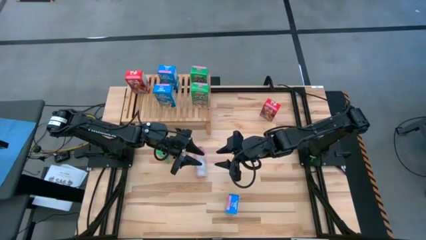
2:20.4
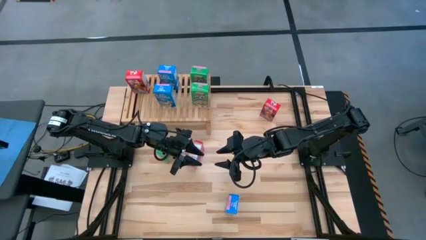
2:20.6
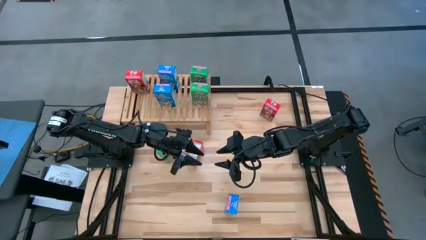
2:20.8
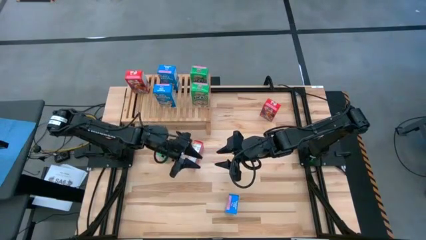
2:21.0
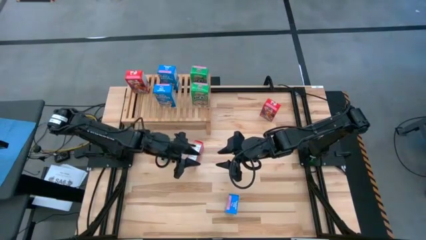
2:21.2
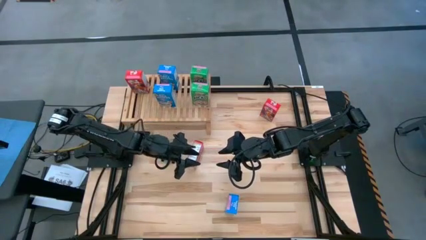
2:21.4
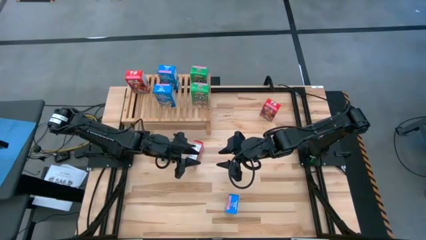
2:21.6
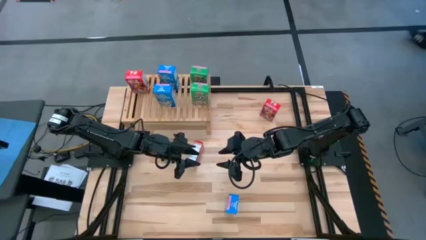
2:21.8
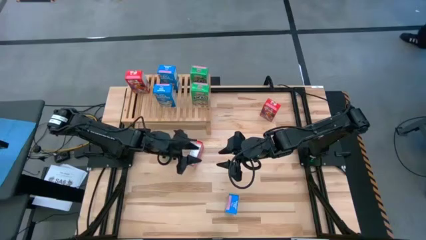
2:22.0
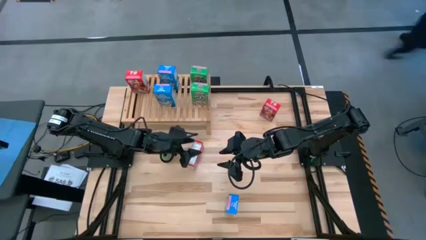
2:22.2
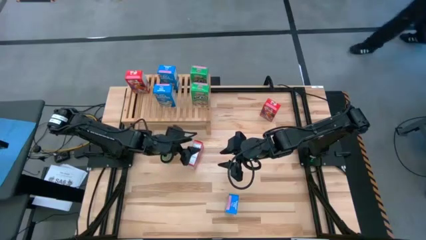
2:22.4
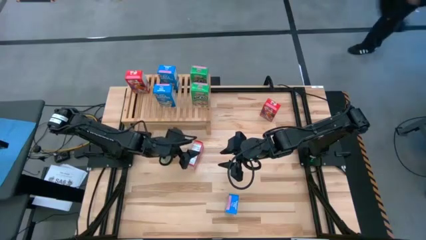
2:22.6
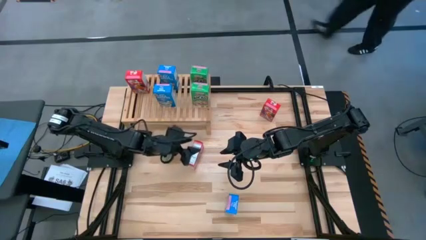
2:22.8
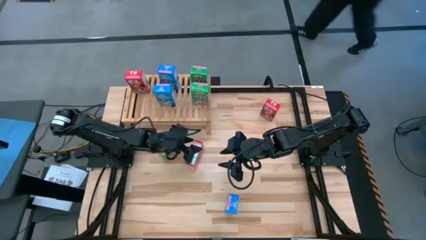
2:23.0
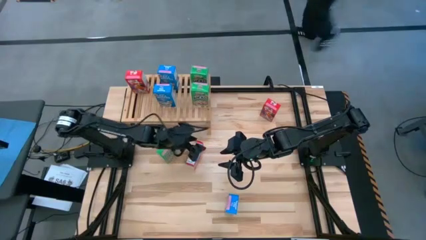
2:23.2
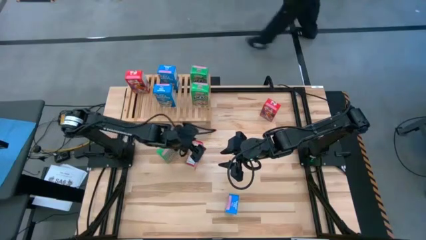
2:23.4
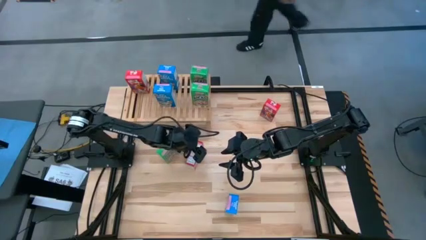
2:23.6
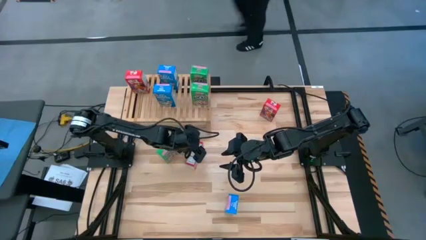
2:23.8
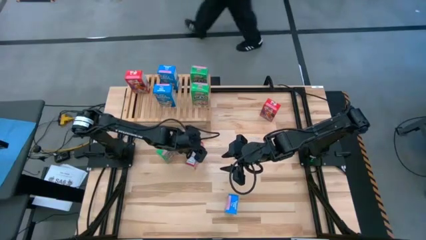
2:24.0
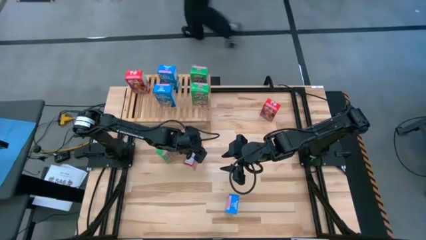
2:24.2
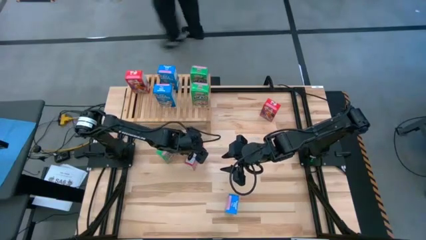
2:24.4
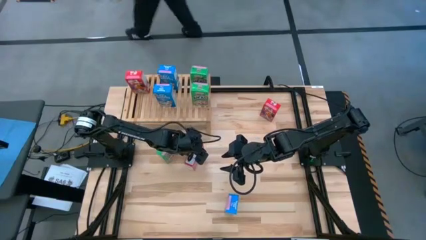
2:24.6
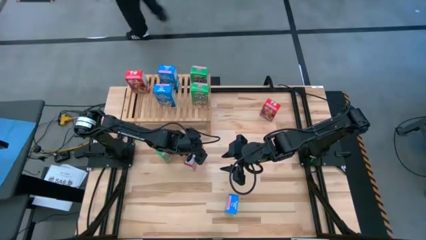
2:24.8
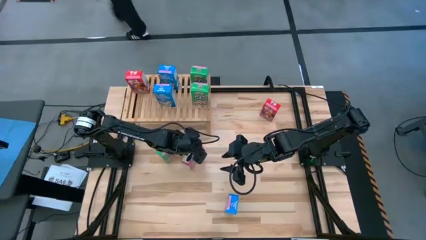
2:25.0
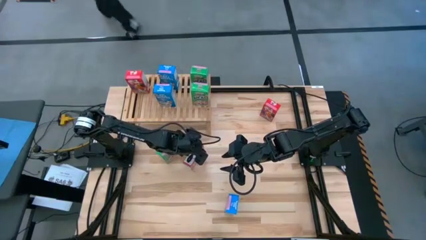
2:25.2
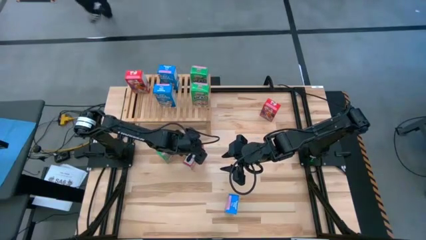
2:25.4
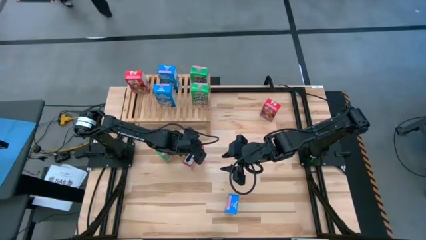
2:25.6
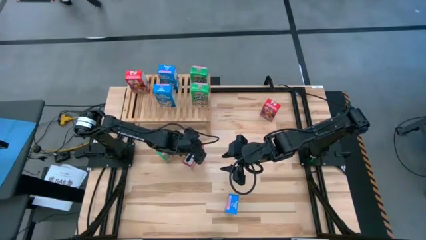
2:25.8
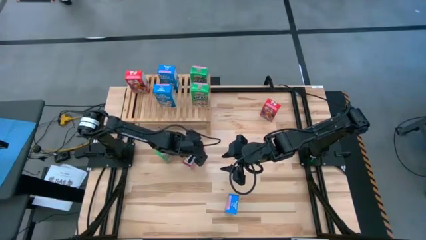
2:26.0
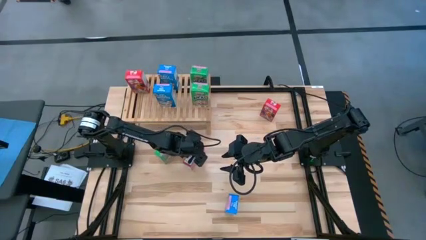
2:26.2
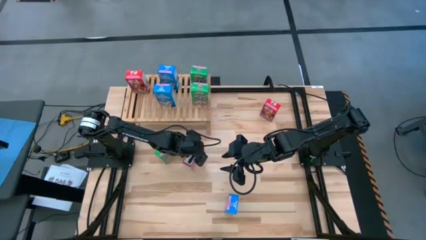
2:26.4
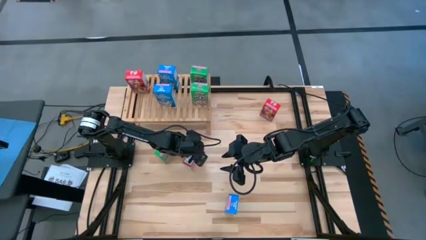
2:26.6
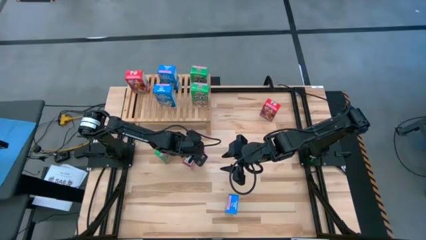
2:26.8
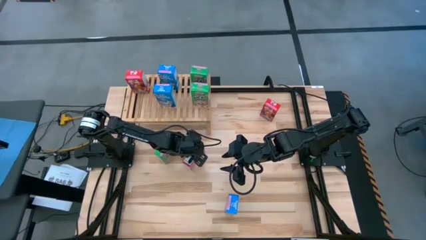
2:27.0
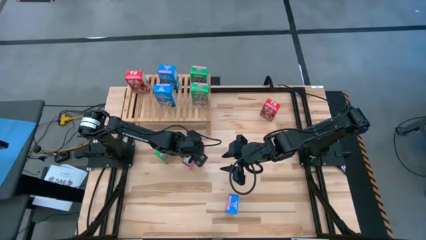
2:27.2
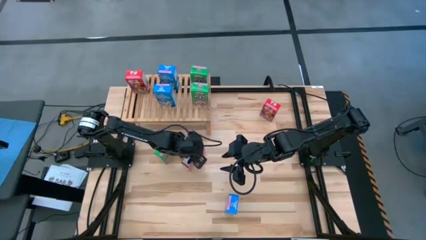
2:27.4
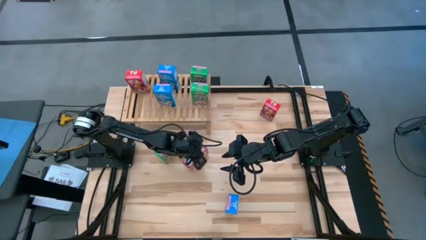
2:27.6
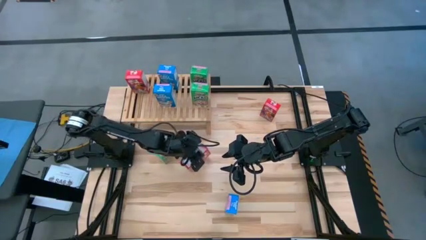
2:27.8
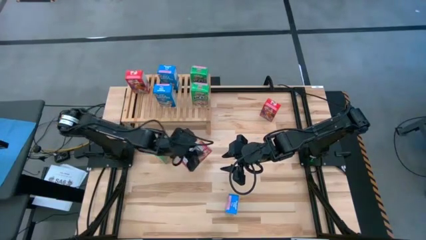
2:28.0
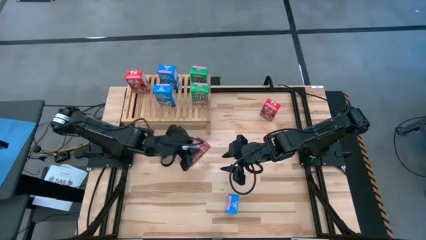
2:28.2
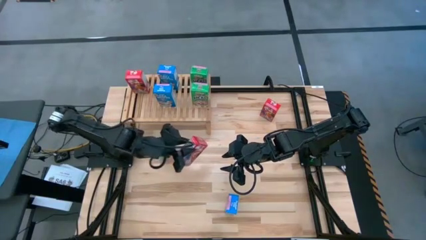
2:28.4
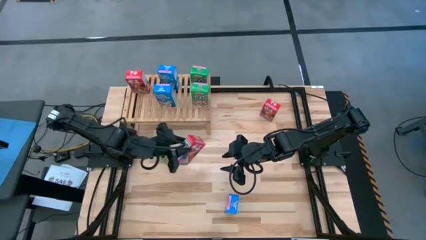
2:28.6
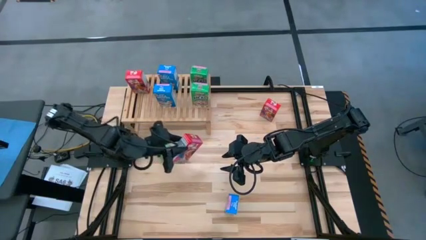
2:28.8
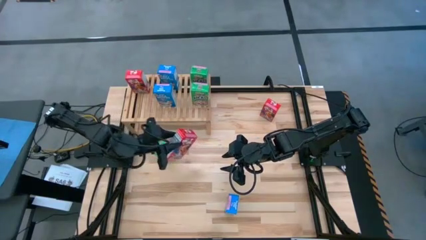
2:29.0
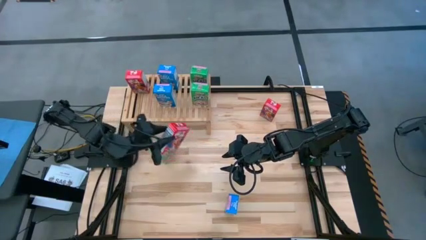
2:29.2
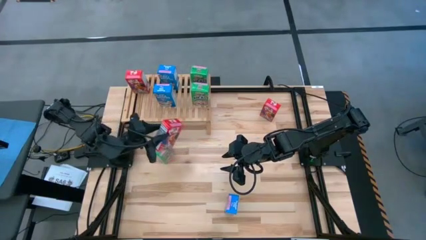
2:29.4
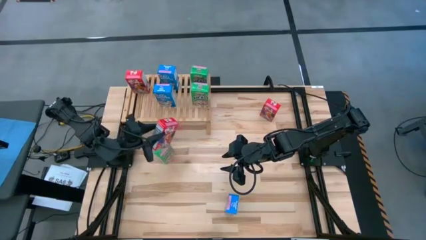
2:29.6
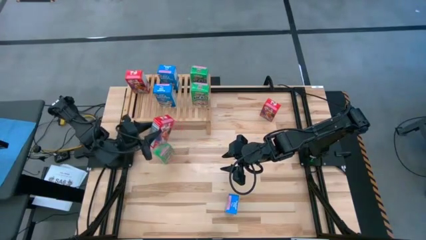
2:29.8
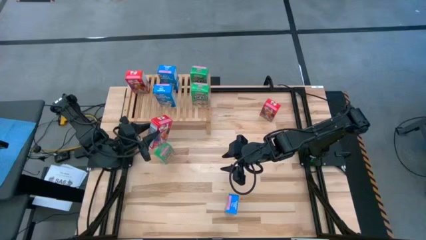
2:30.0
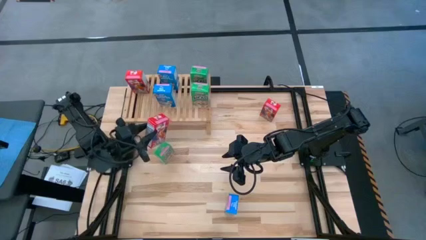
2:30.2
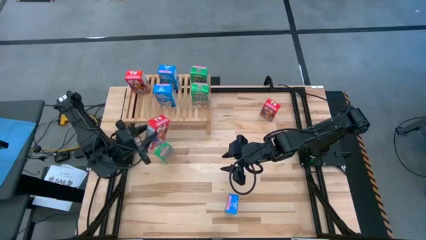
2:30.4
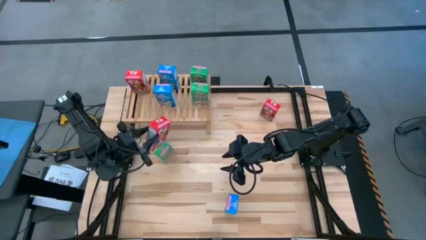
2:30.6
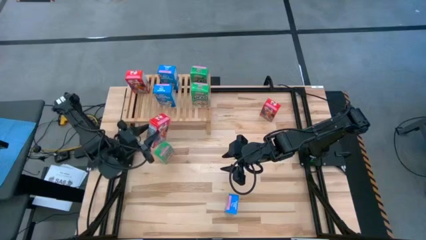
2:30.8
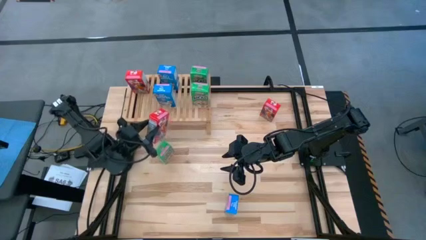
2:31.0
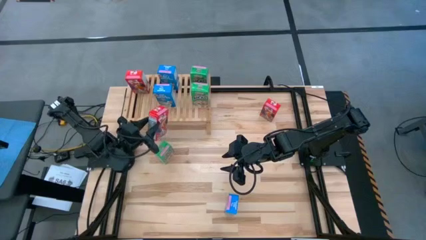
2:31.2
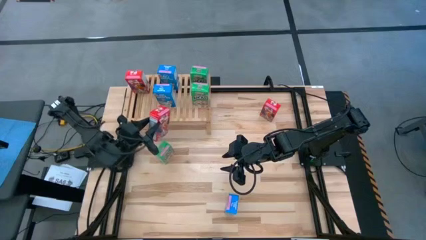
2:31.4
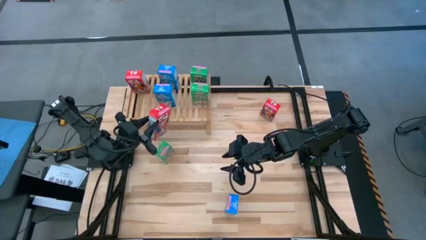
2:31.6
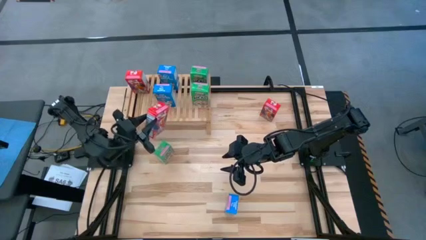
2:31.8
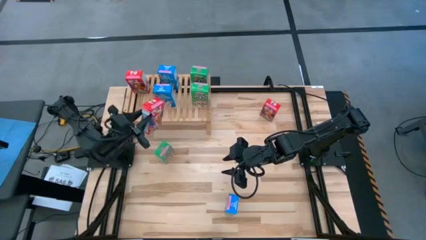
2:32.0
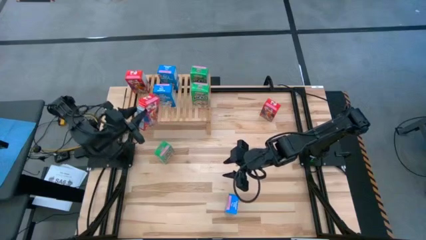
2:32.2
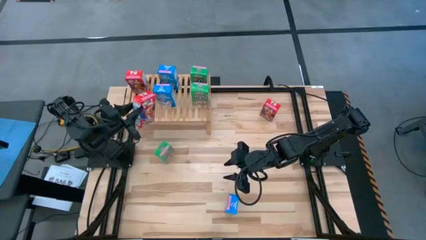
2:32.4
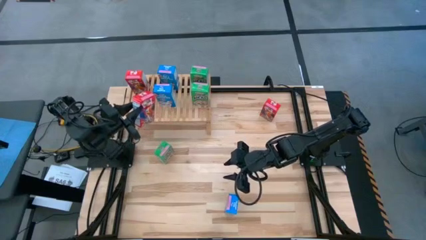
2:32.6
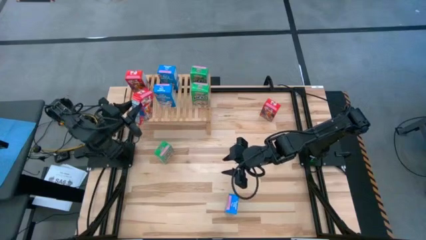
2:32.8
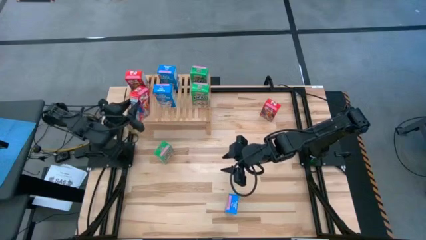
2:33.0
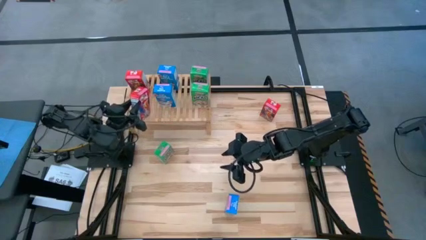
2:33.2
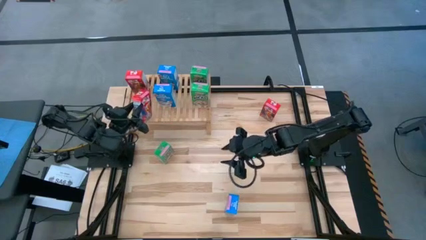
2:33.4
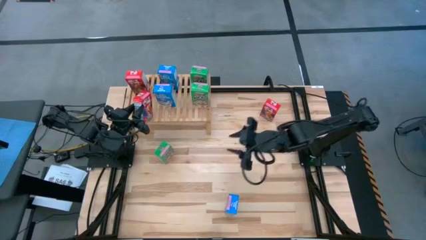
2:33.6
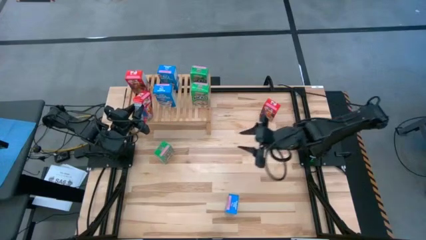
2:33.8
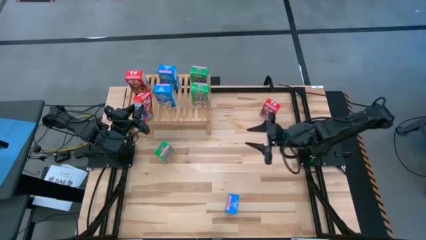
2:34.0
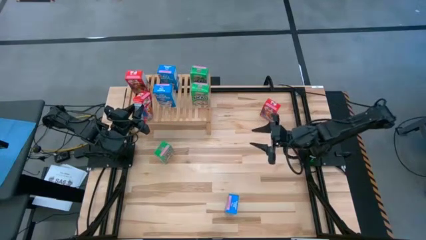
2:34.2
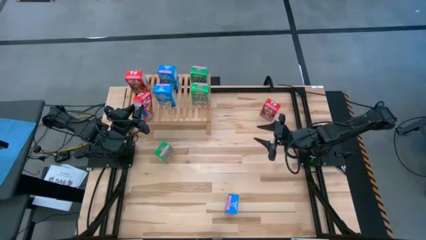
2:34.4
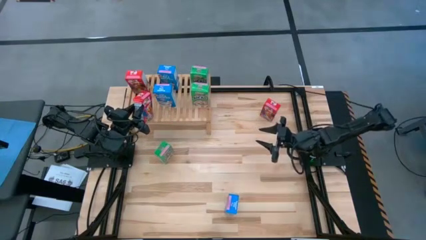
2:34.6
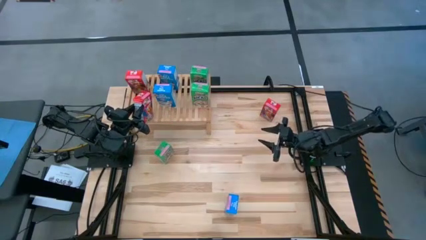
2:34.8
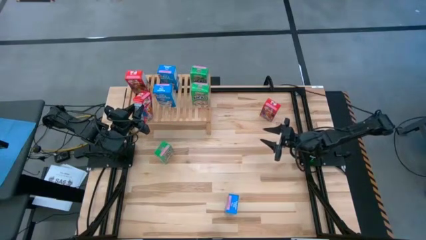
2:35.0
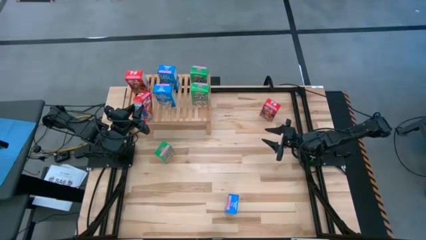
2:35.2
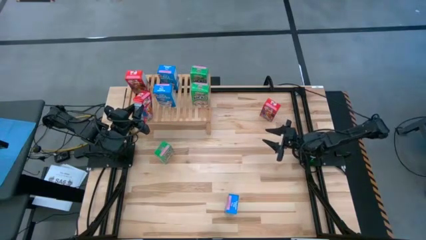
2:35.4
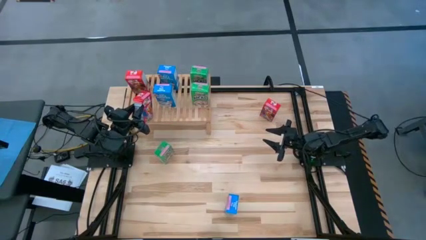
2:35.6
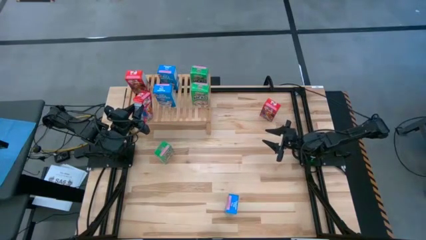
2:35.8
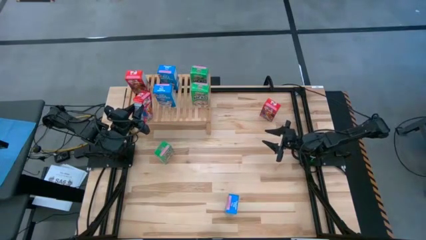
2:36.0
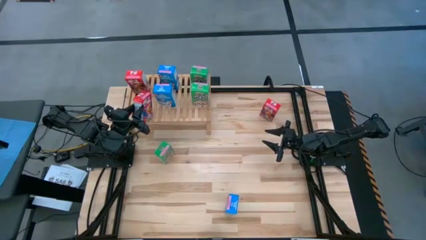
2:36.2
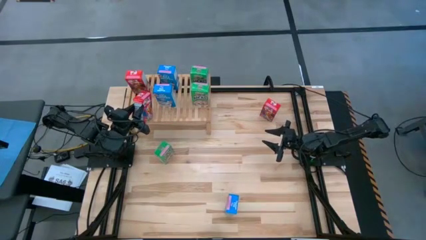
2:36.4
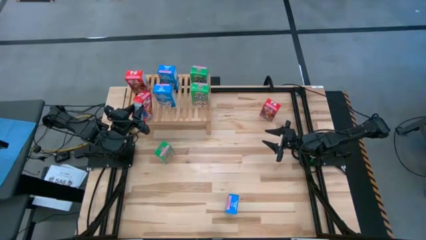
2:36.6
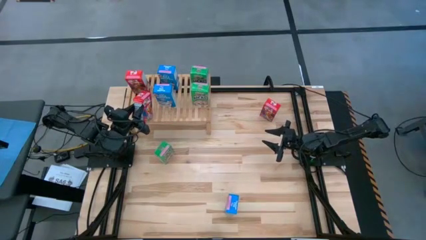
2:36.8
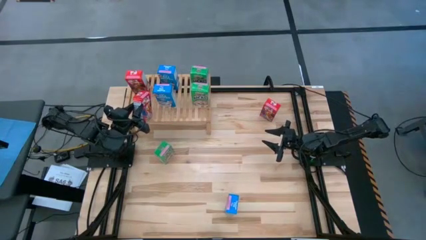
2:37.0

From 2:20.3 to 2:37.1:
Task: Stack cereal on shelf
Put the bottom red cereal box on the shelf aligned with the red cereal box
